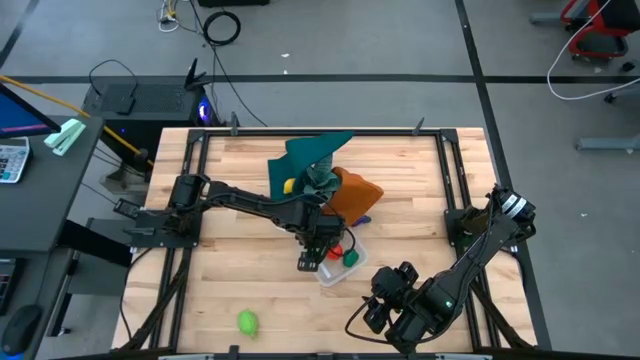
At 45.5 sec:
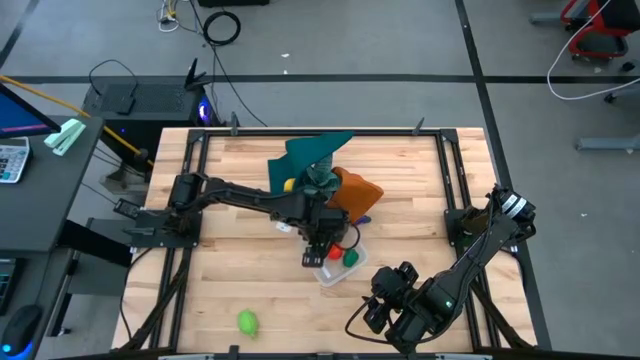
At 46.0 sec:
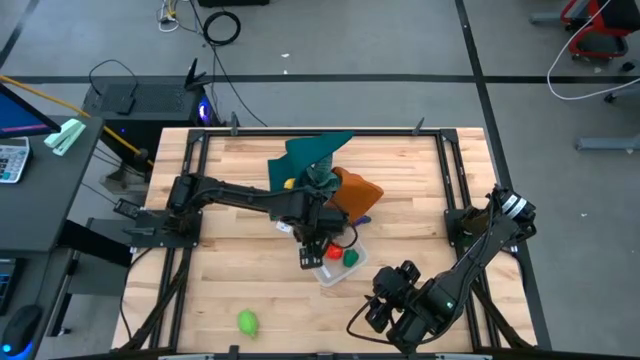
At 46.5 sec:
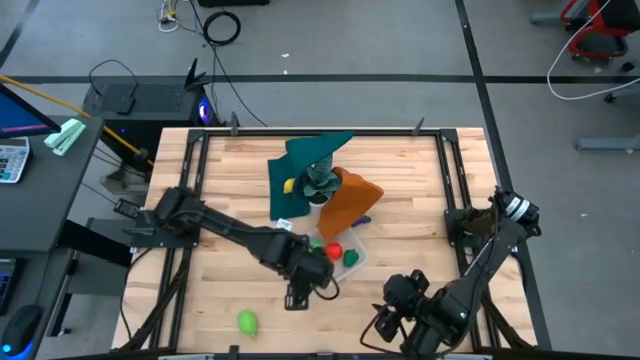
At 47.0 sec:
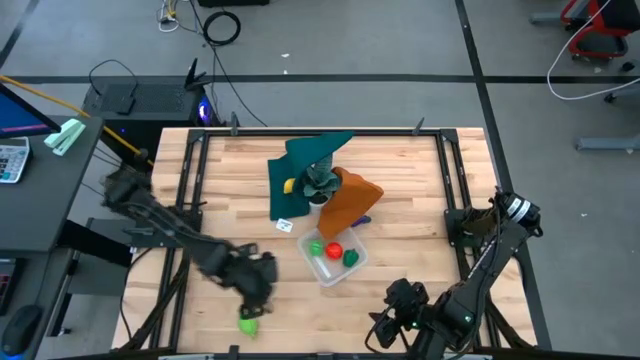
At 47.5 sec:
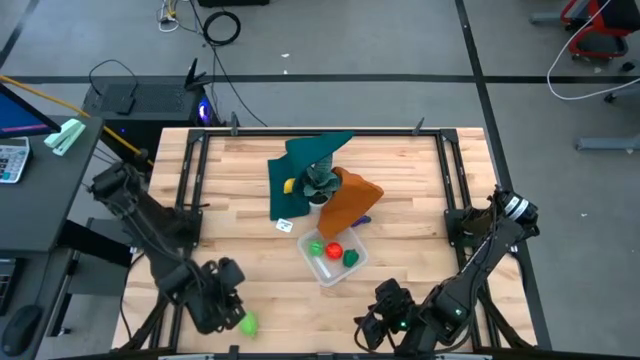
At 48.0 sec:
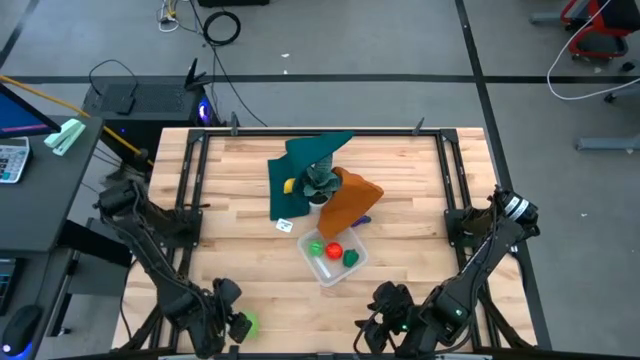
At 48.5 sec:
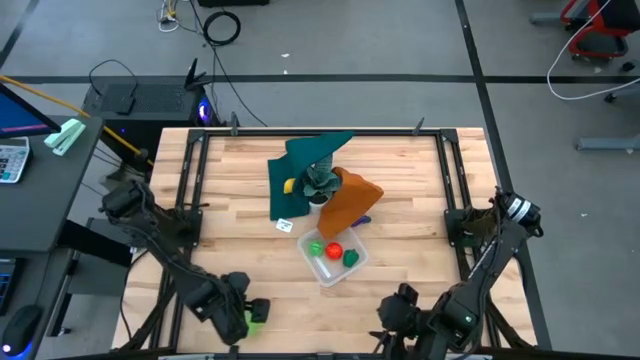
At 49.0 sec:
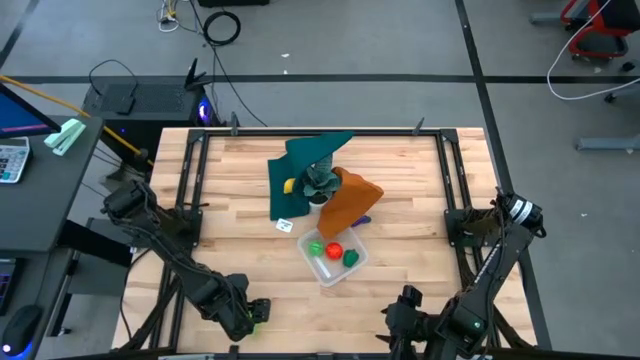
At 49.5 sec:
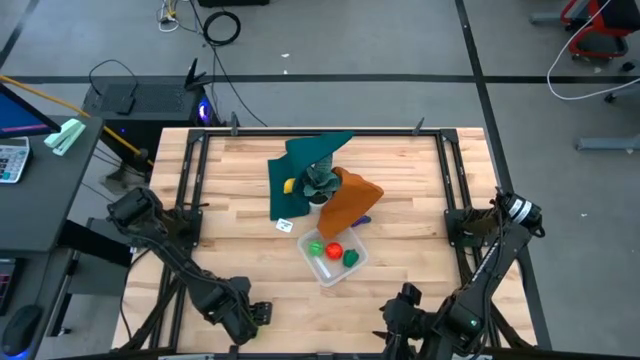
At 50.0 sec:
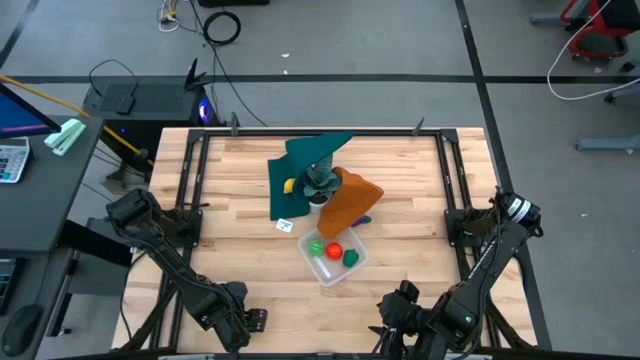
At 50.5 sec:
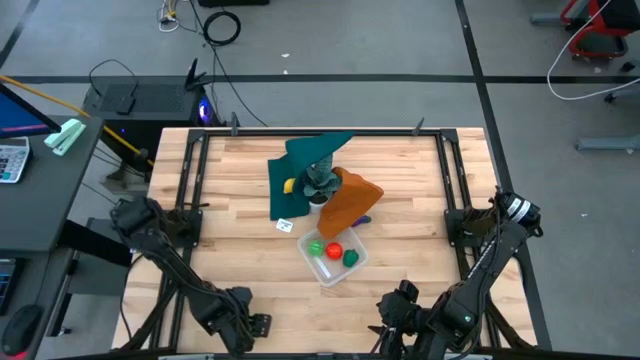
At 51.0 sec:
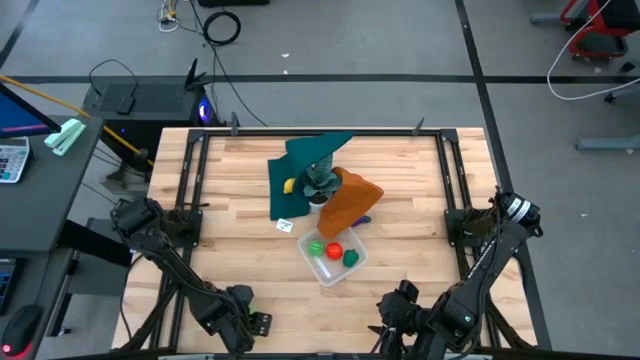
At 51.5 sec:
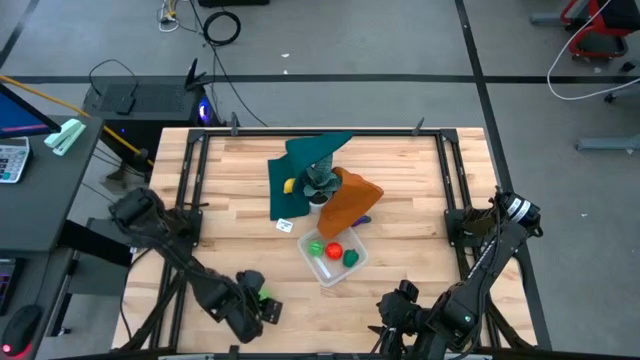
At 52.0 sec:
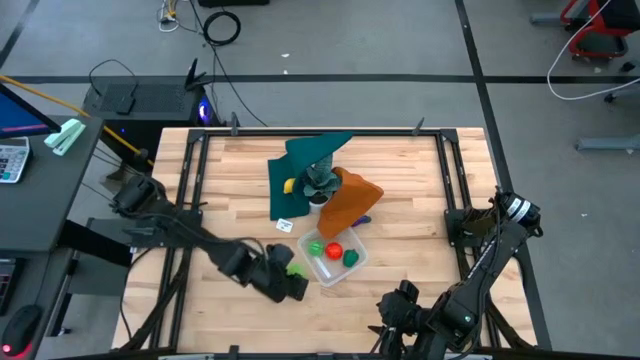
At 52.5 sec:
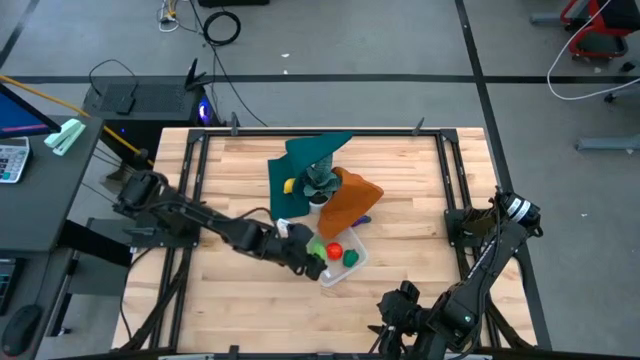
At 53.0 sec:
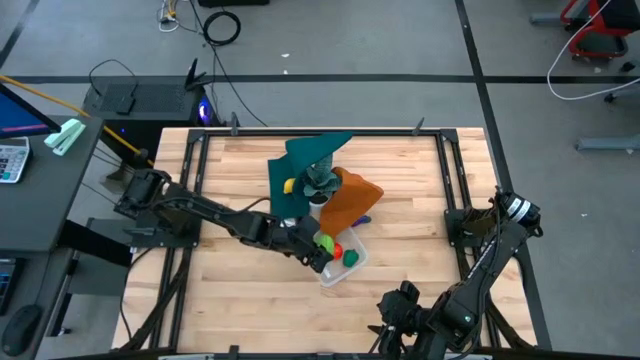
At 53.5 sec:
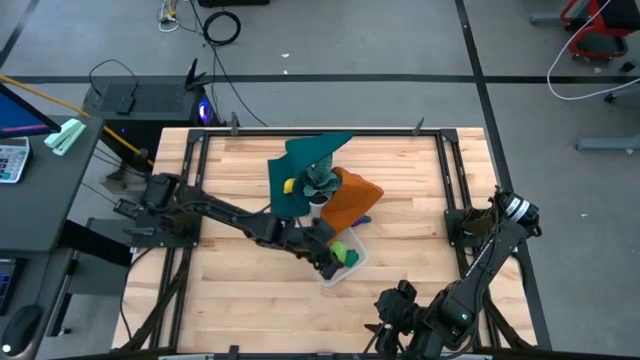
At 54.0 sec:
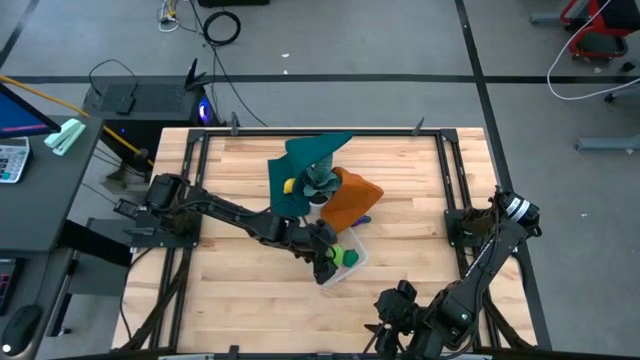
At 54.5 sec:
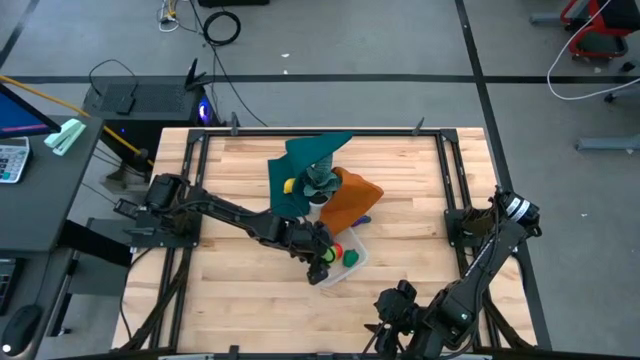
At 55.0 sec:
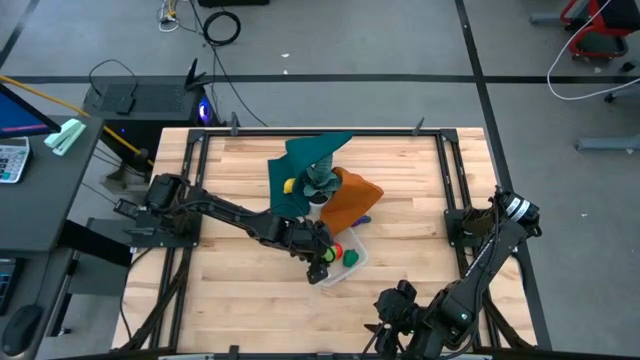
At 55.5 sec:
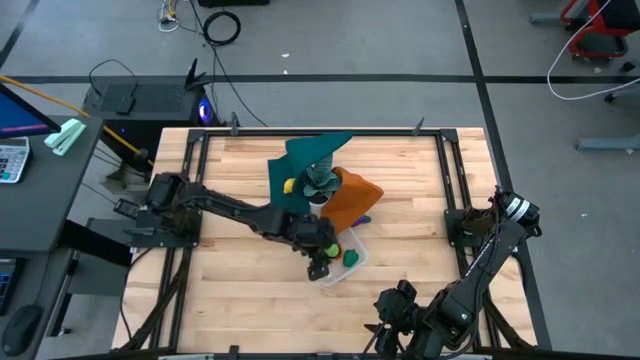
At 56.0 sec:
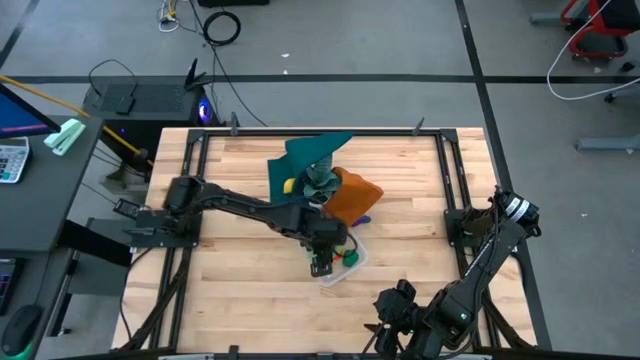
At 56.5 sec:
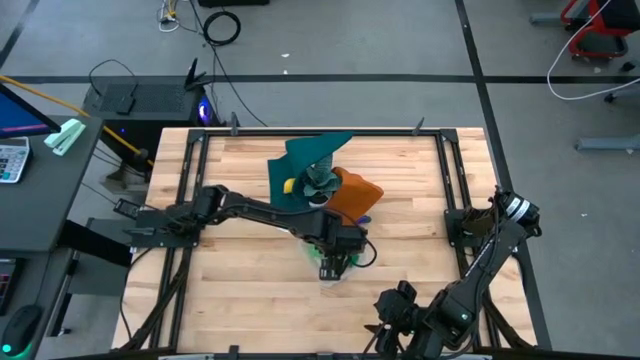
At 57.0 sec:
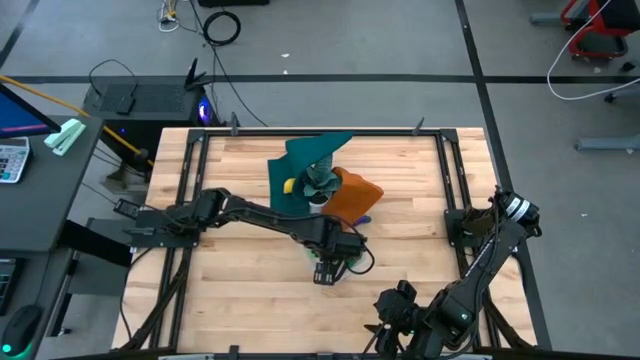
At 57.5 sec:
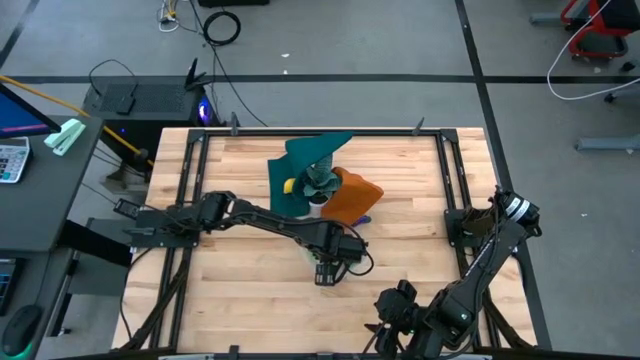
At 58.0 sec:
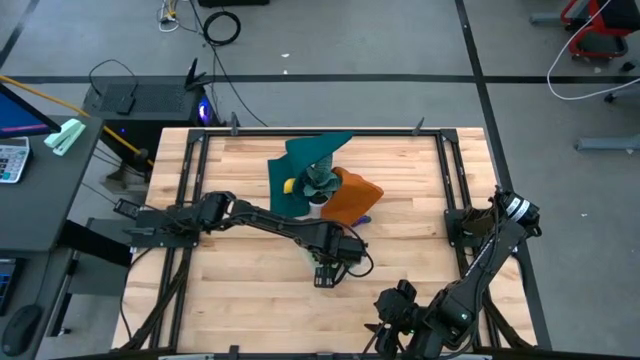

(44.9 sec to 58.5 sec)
Task: Pick and placing Produce into tupperware
Put the melon into the transparent bin
